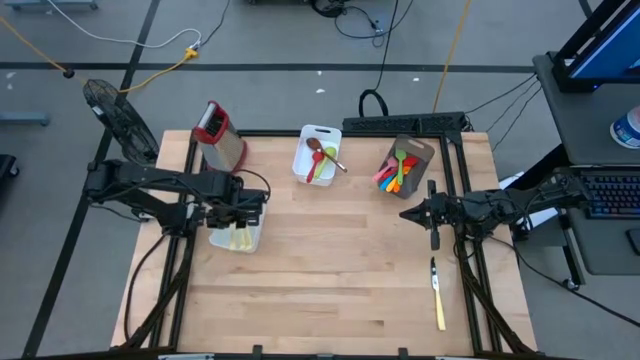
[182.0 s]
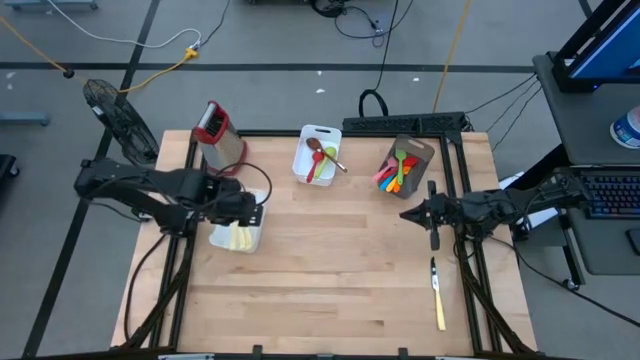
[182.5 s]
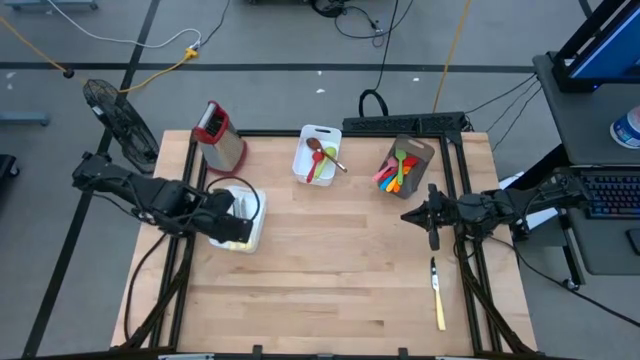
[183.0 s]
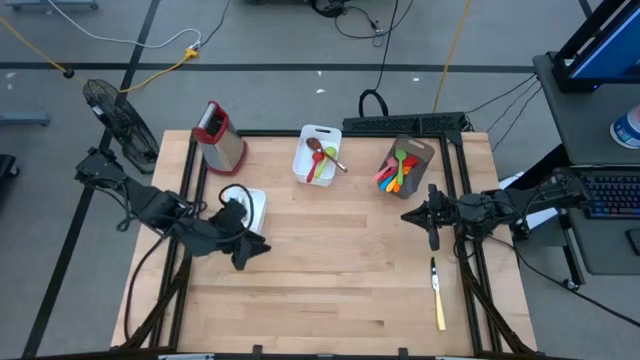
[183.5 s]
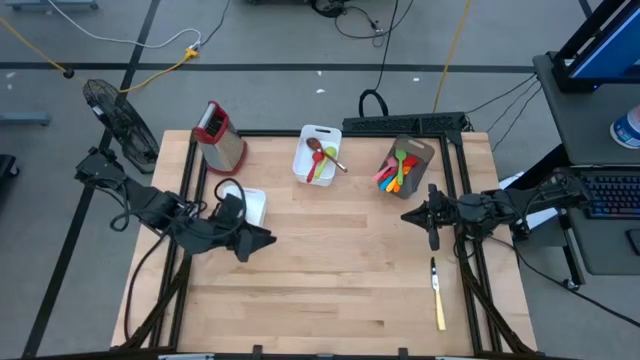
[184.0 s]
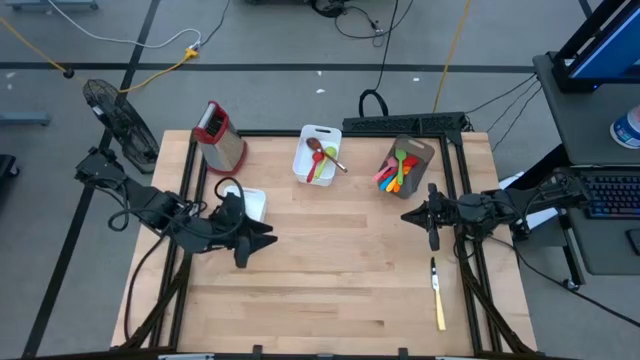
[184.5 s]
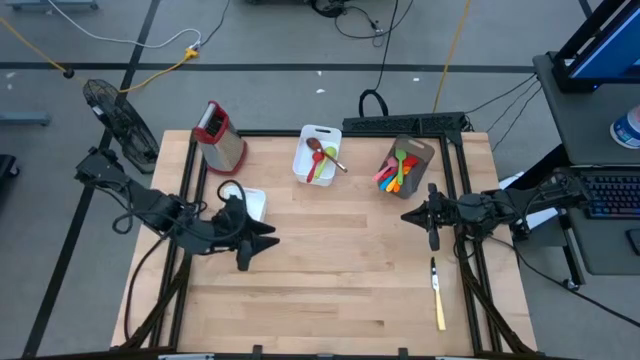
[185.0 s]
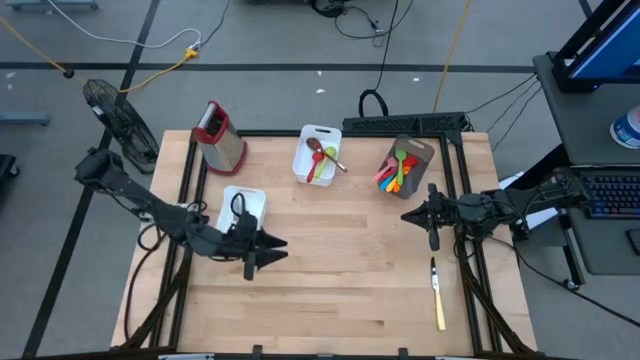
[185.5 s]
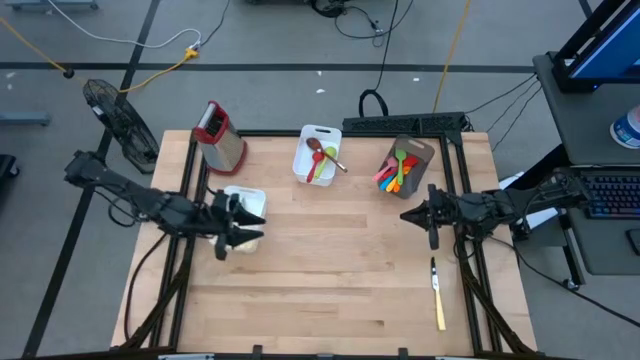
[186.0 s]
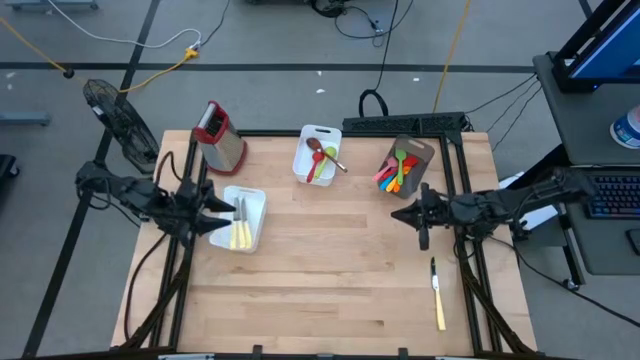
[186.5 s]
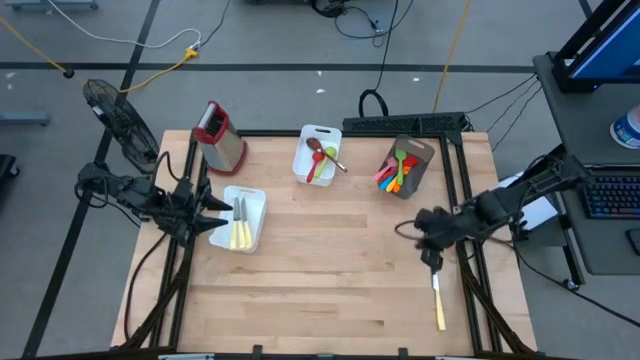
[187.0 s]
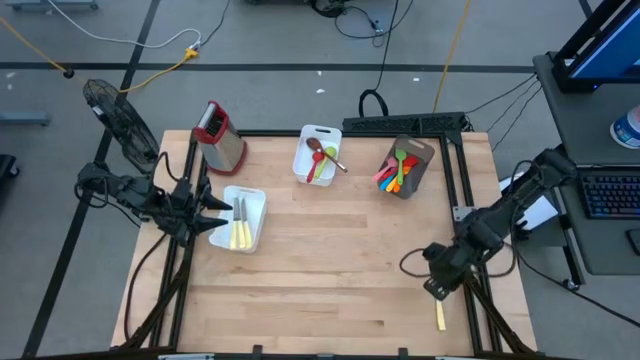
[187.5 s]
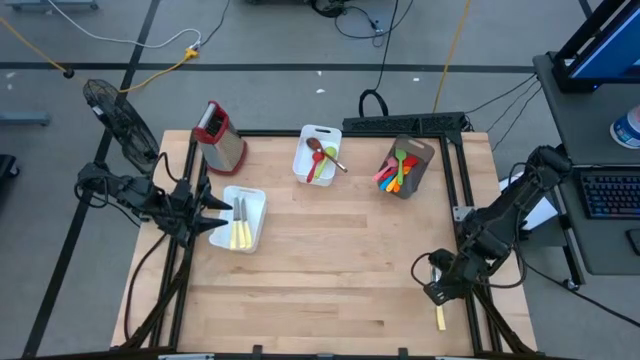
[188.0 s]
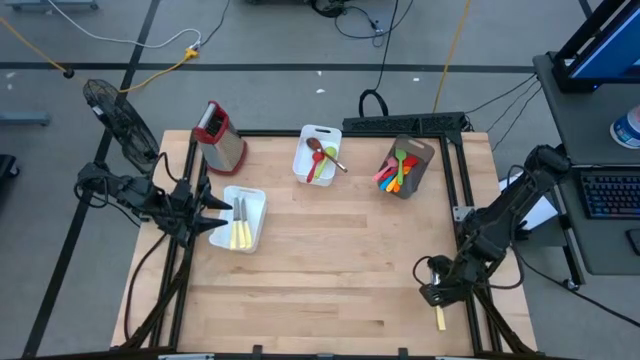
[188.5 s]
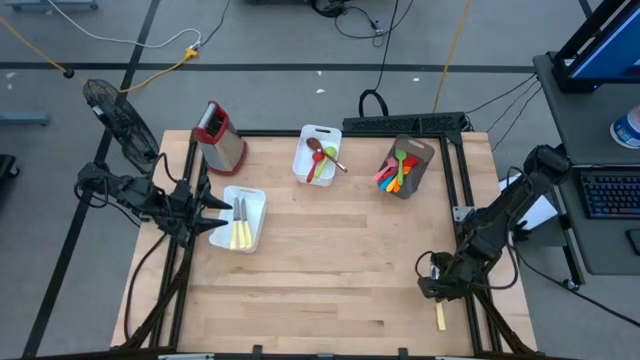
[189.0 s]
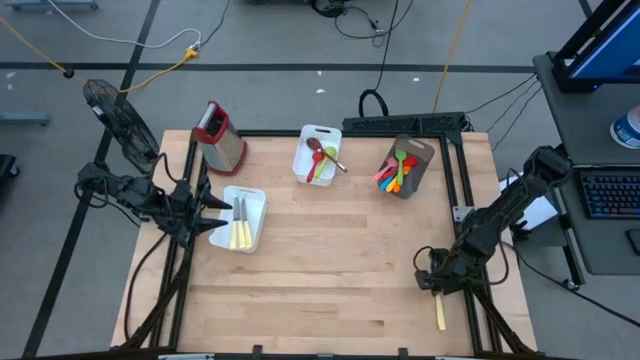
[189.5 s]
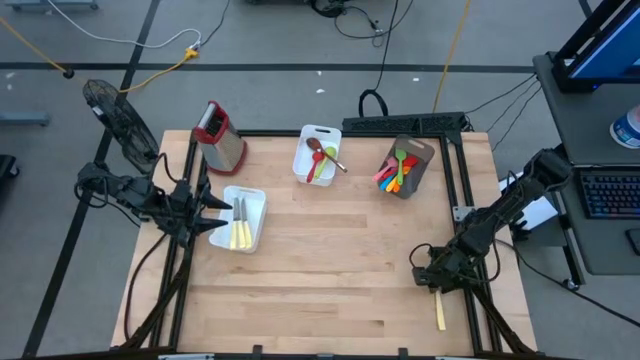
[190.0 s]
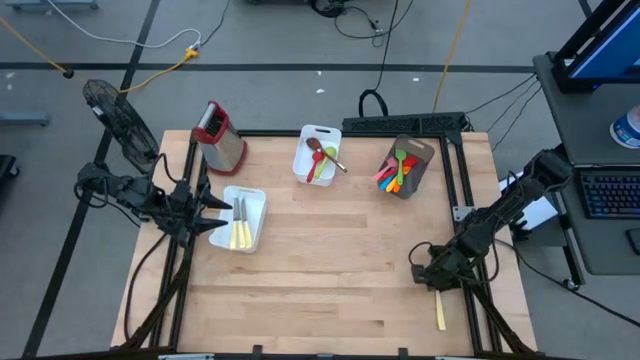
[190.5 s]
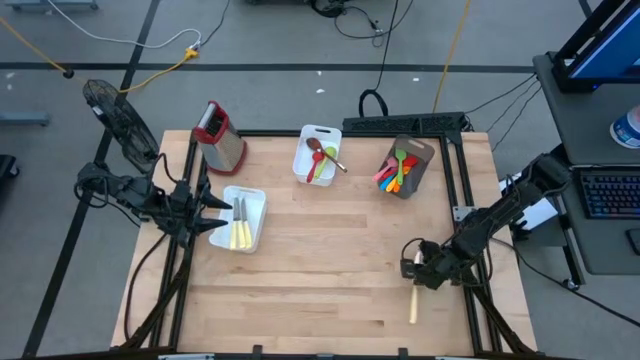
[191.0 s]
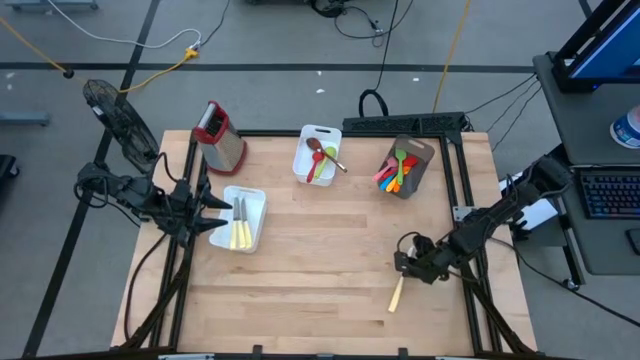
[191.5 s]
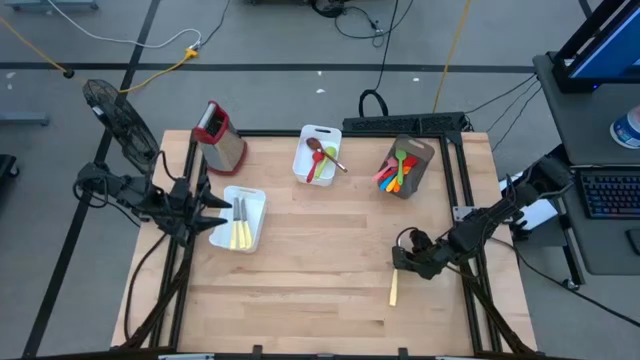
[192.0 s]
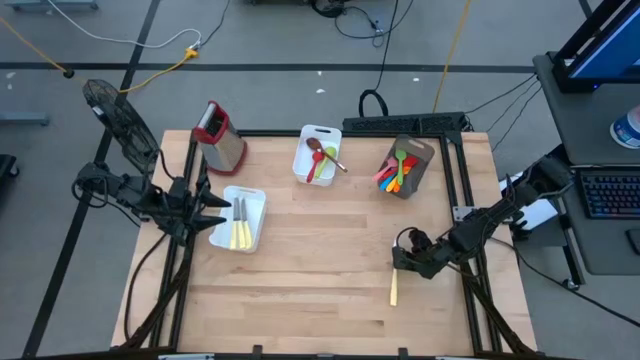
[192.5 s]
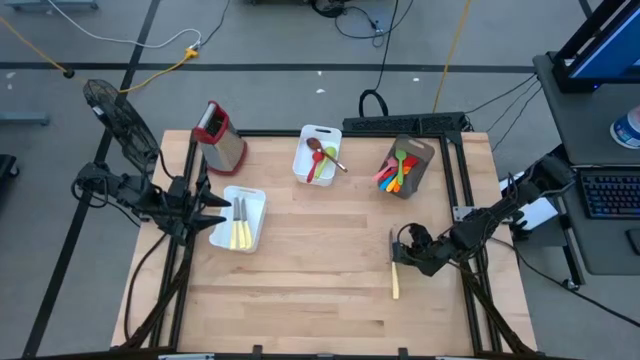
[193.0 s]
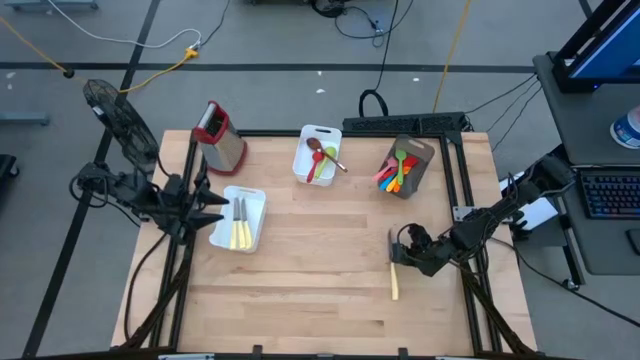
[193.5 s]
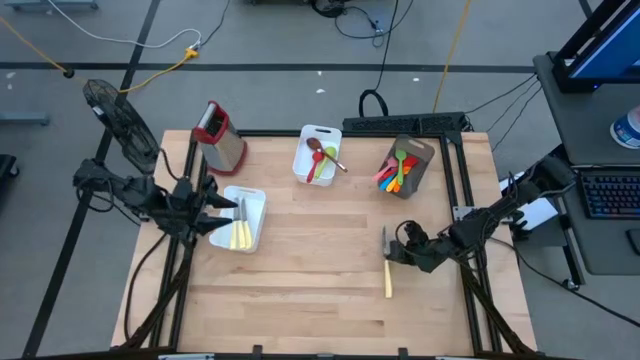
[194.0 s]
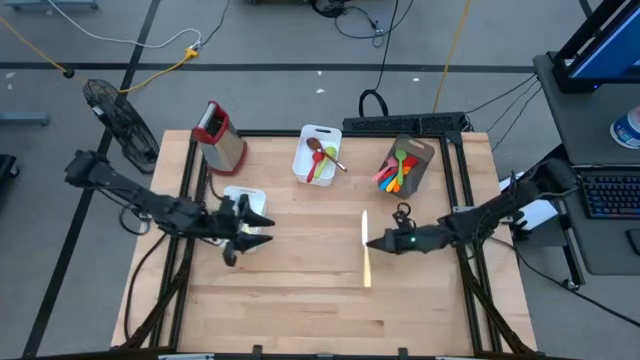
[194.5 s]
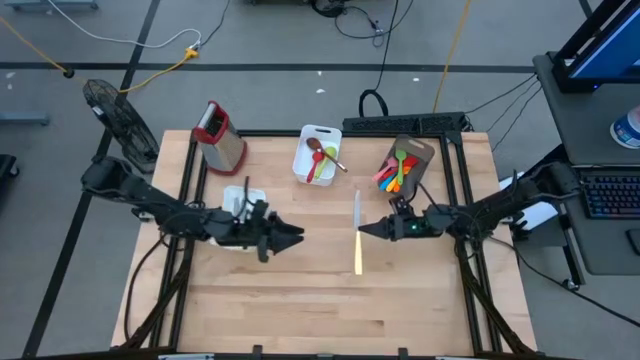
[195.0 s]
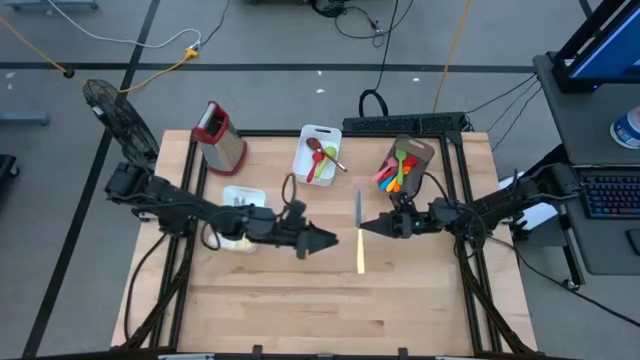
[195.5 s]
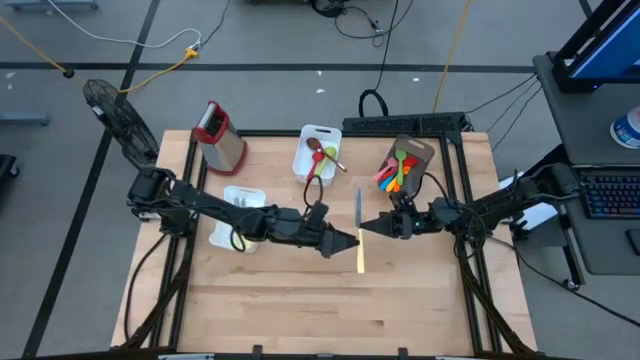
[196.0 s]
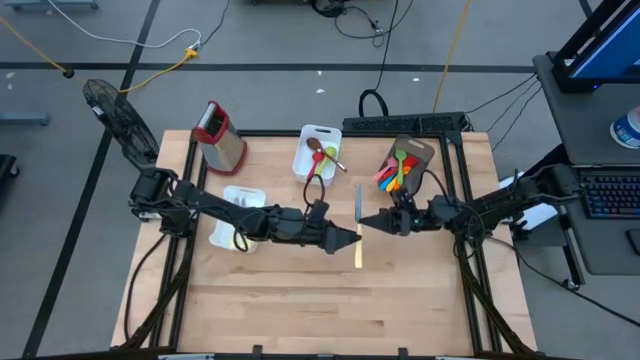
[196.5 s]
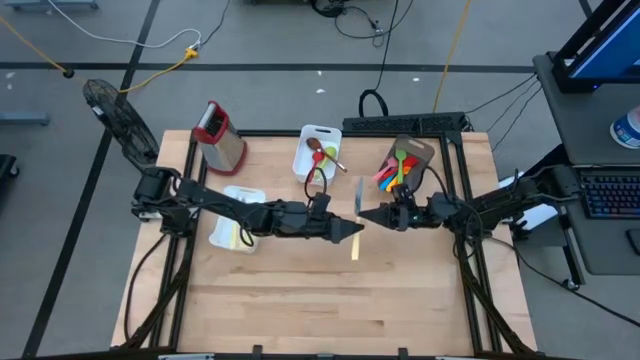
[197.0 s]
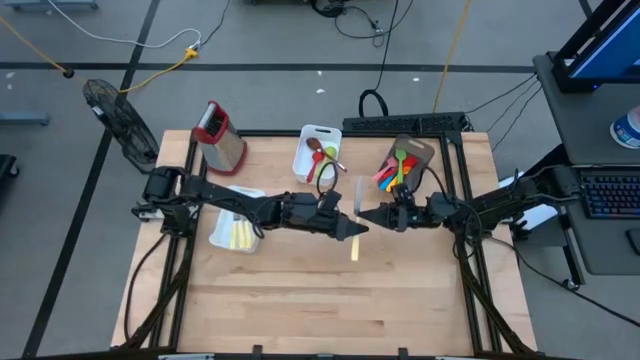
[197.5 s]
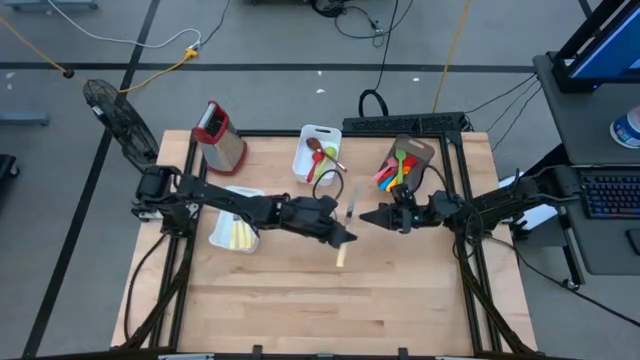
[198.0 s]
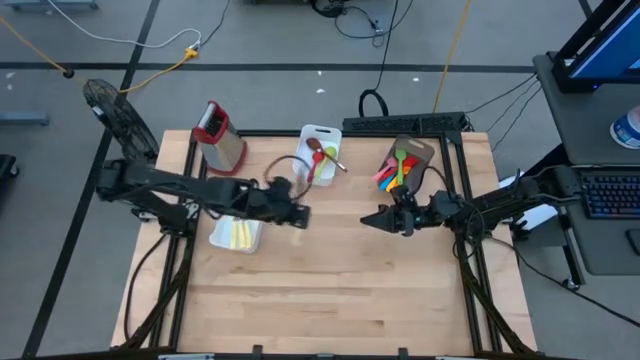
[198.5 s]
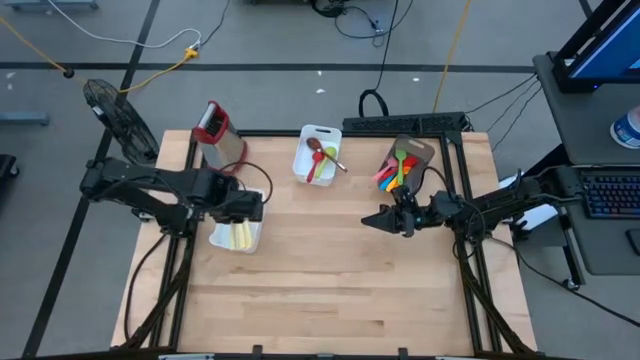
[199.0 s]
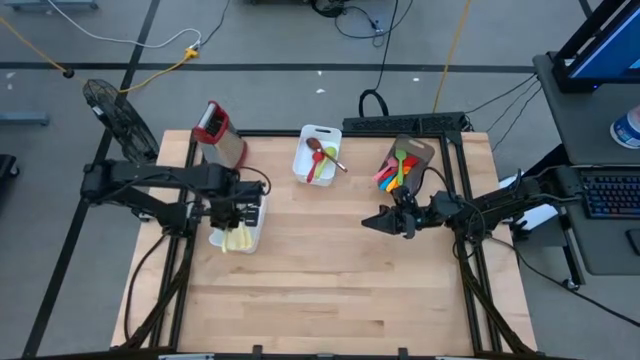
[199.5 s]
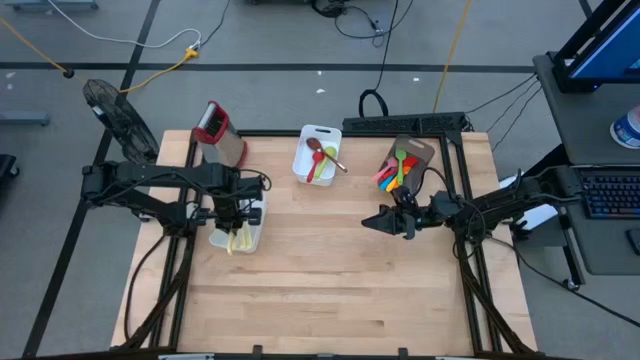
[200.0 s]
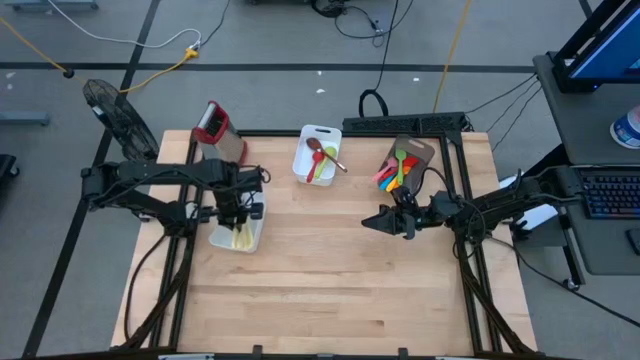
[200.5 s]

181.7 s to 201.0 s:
Task: Pick & Place Kitchen Items
Put the yellow knife into the bottom white bin

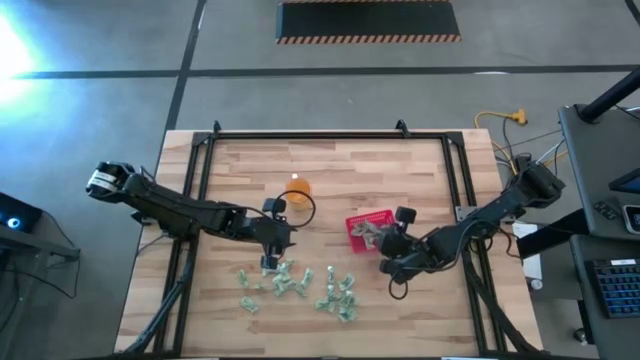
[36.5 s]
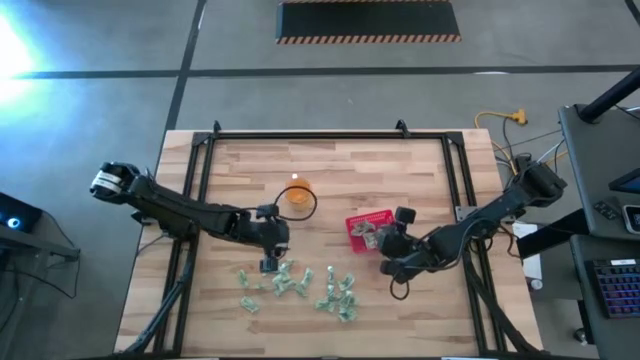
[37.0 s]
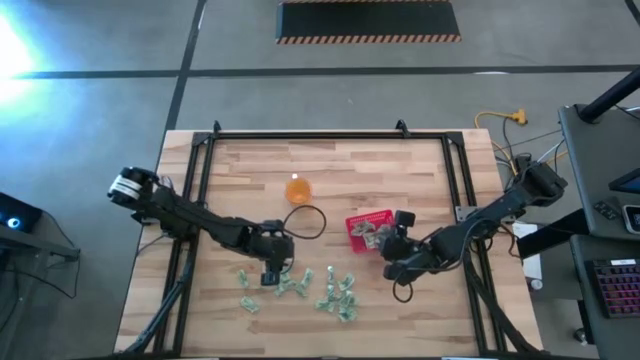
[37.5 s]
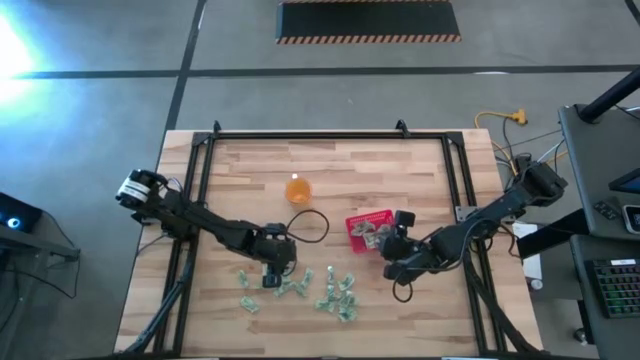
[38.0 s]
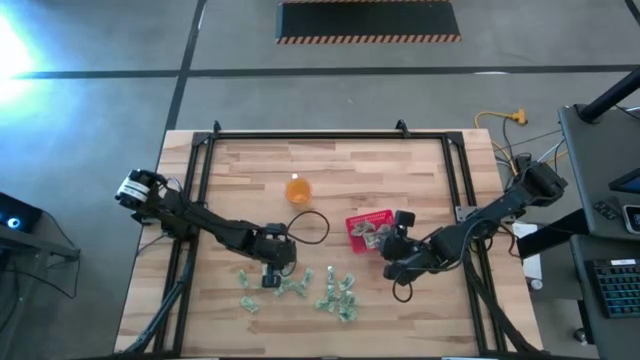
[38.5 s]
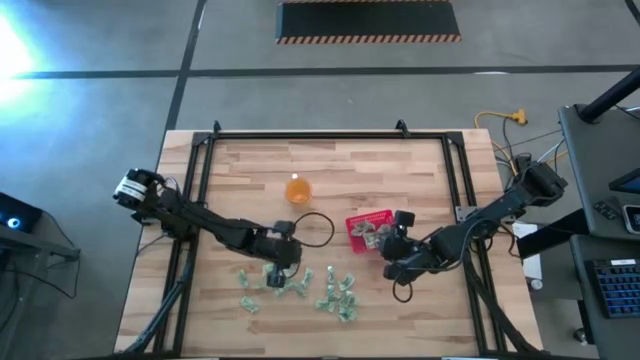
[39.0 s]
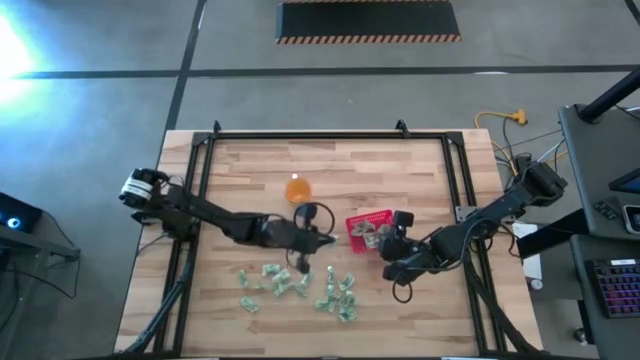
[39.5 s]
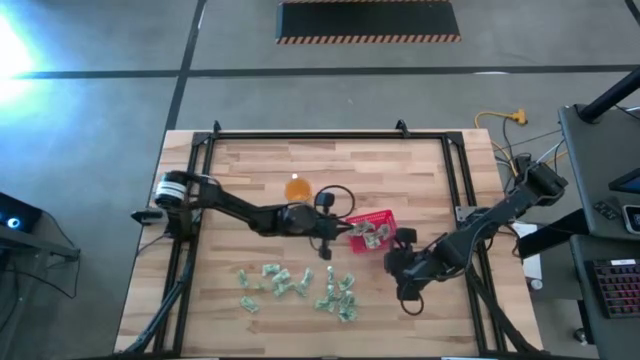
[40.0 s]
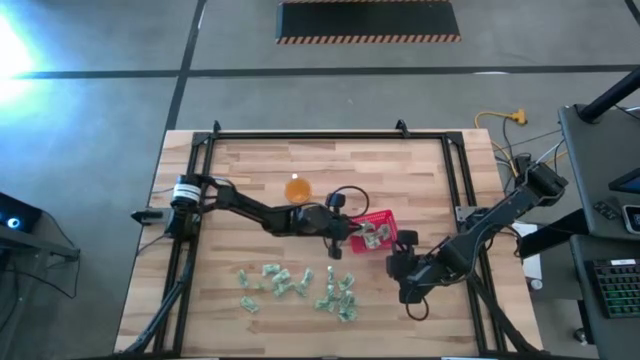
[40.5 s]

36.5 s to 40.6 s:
Task: Pick and place Stevia / Truvia into bins
Put the stevia packet into the basket
